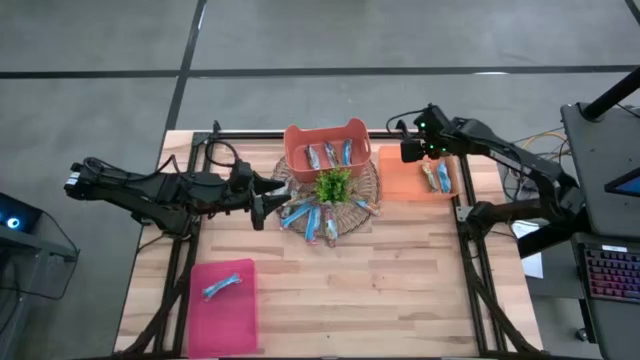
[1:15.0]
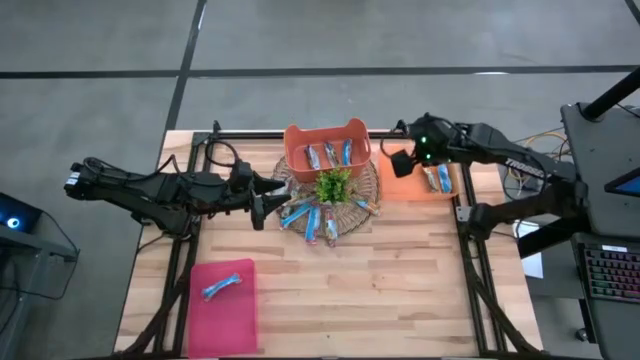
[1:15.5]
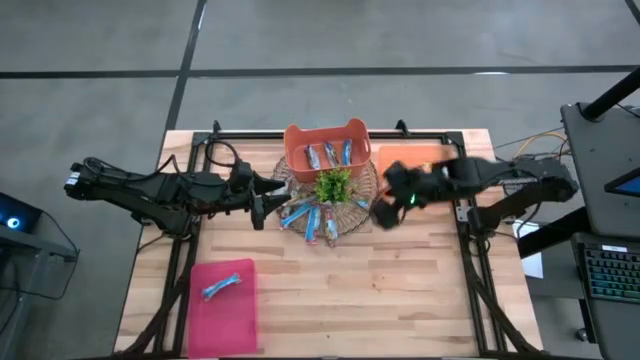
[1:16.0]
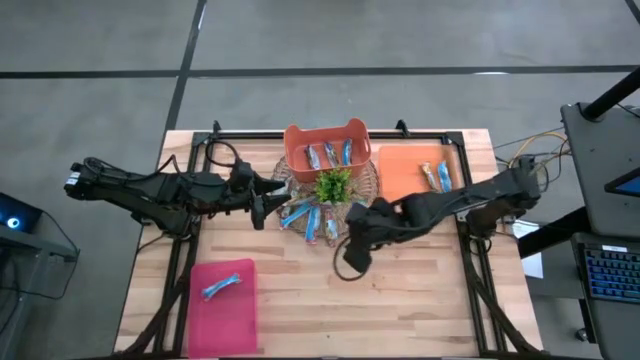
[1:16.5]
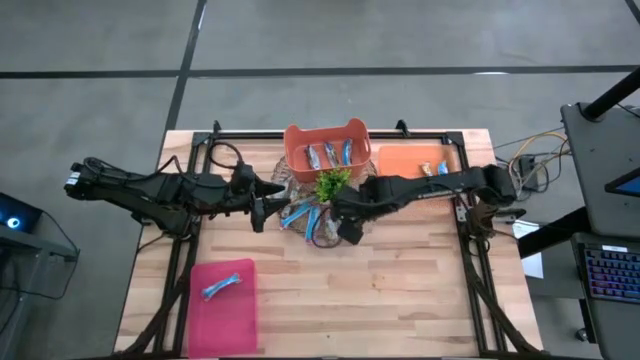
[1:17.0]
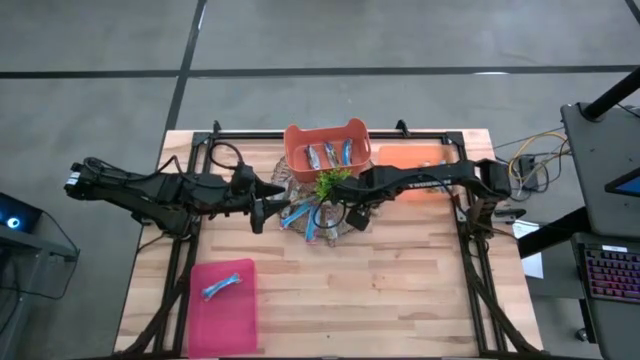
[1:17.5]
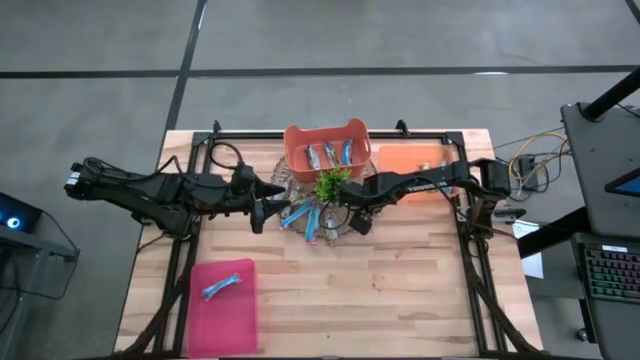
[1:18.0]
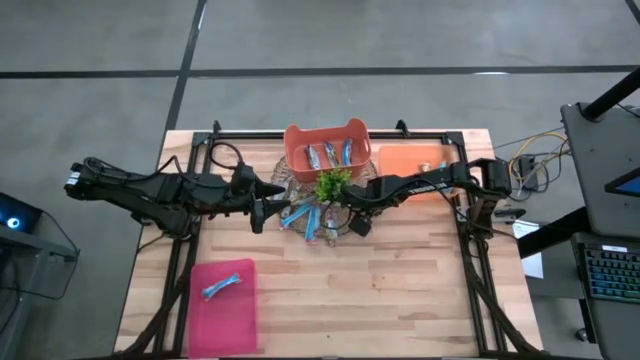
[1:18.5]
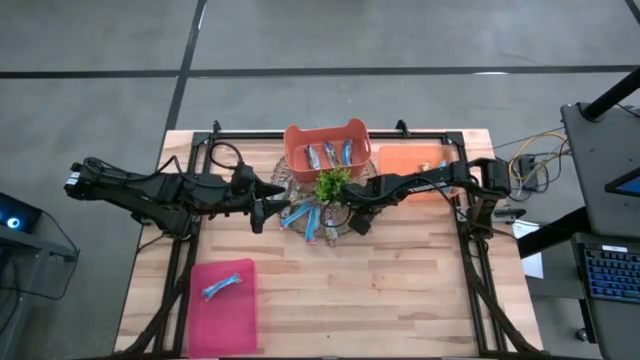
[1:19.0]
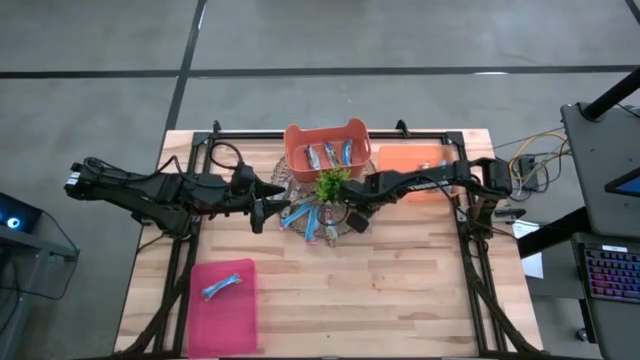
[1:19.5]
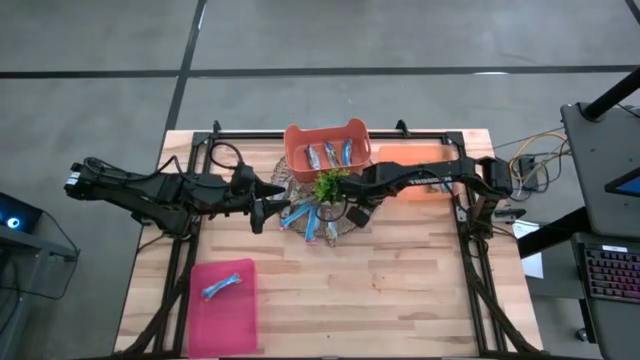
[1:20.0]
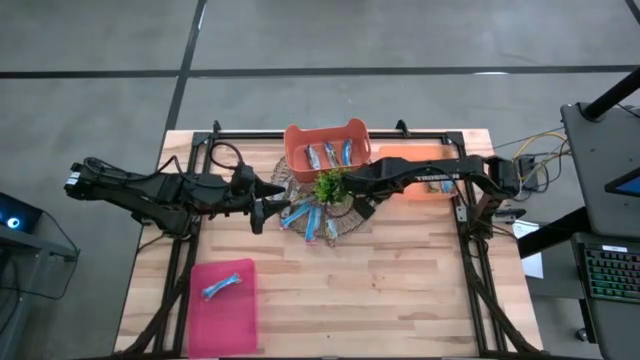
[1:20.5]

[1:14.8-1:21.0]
Task: Pick and place Granola Bars by type
Put the orange granola bar into the orange bin

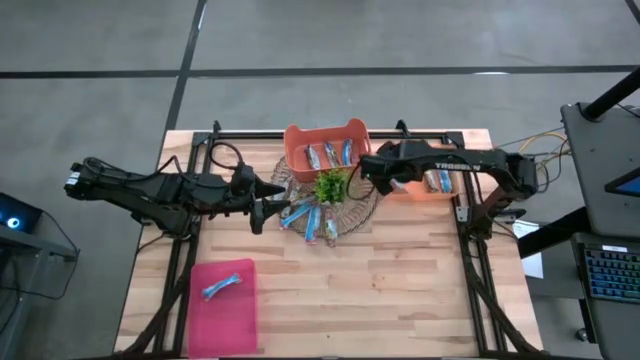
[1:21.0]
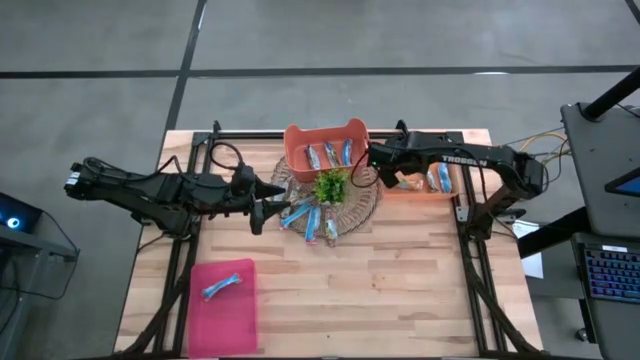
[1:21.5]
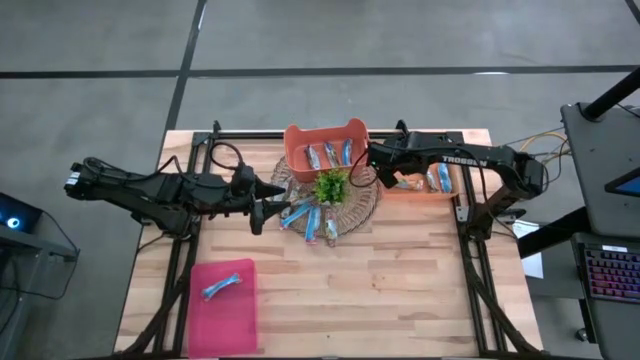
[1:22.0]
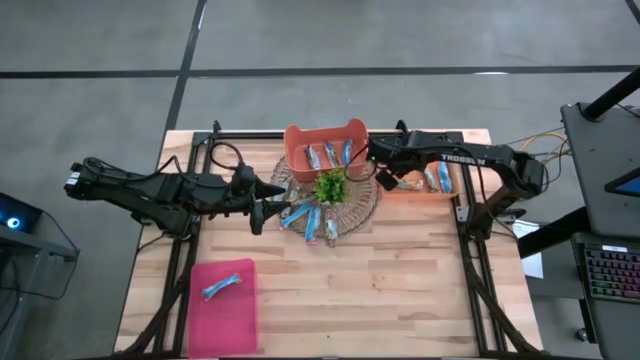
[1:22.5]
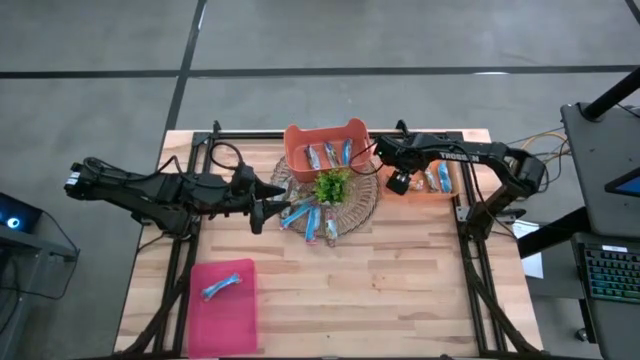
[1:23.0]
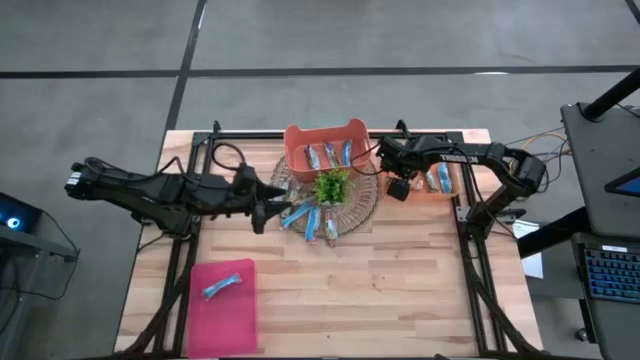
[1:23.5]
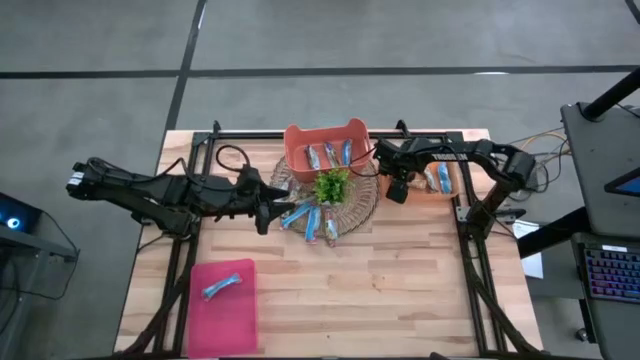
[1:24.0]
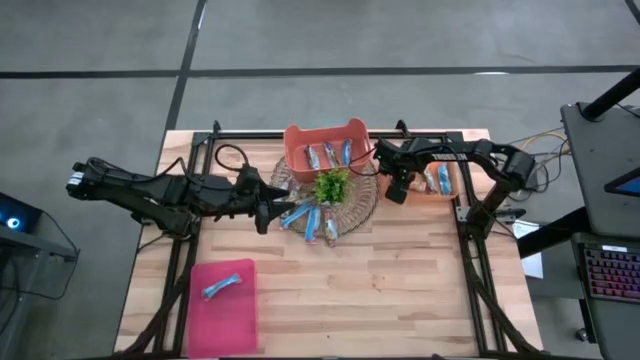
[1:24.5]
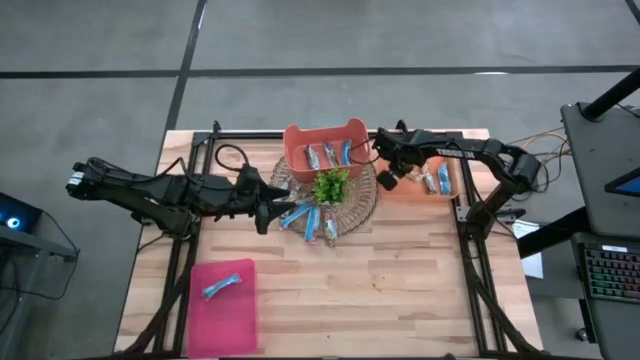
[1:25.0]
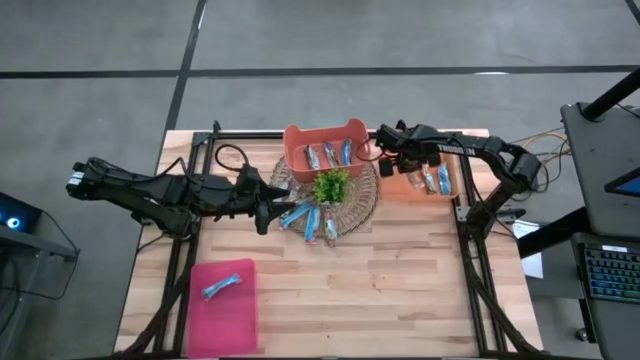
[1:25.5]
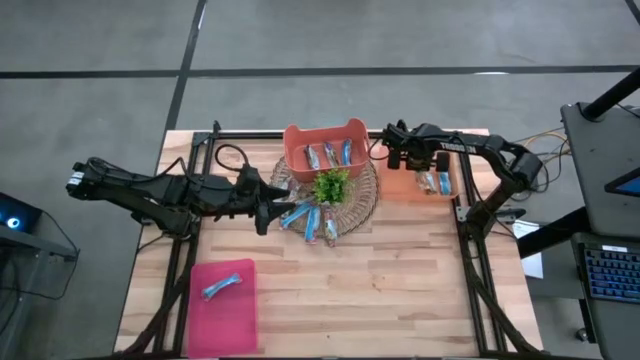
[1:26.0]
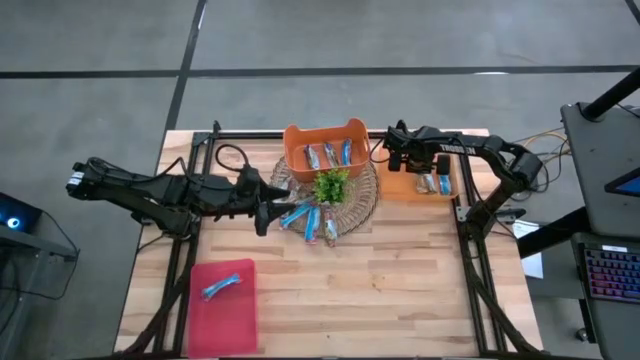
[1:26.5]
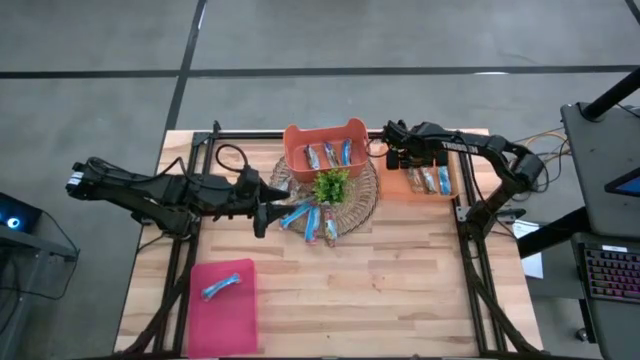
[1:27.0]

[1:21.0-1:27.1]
Put the orange granola bar into the orange bin

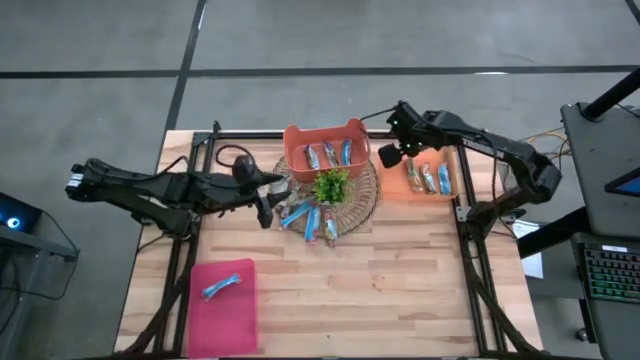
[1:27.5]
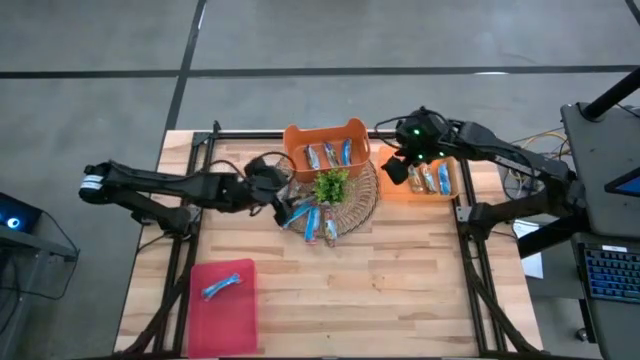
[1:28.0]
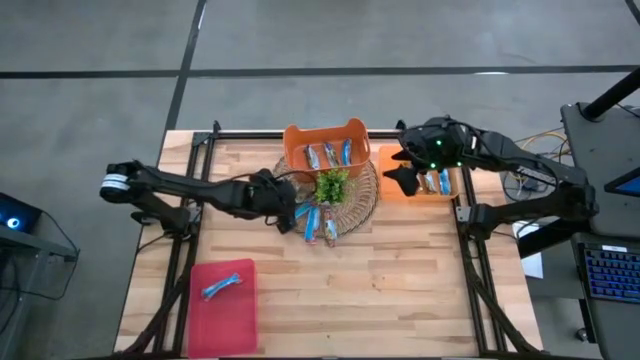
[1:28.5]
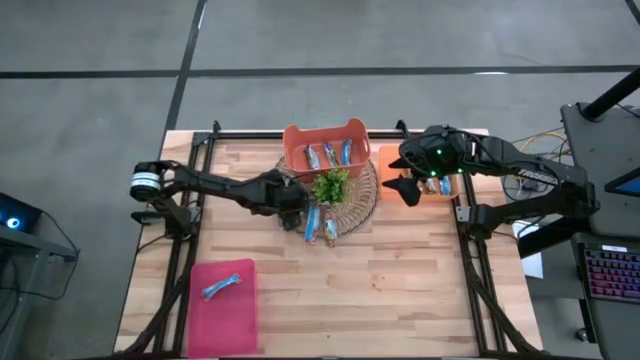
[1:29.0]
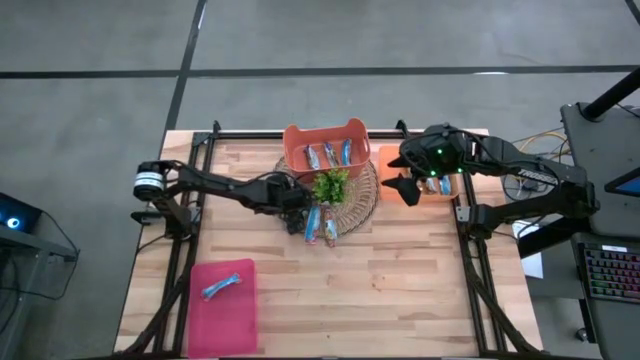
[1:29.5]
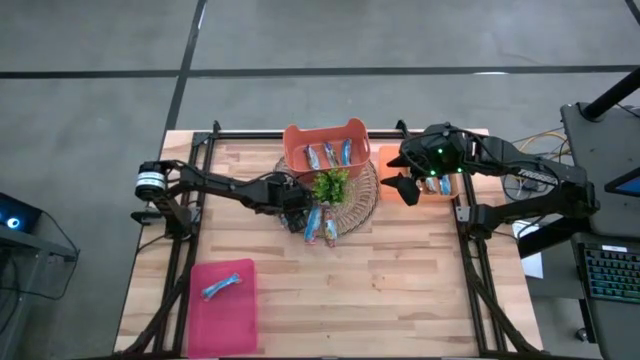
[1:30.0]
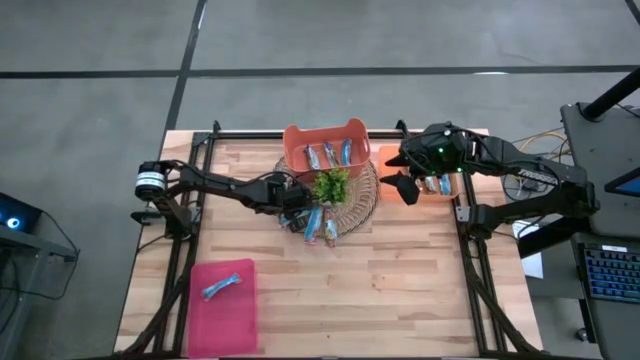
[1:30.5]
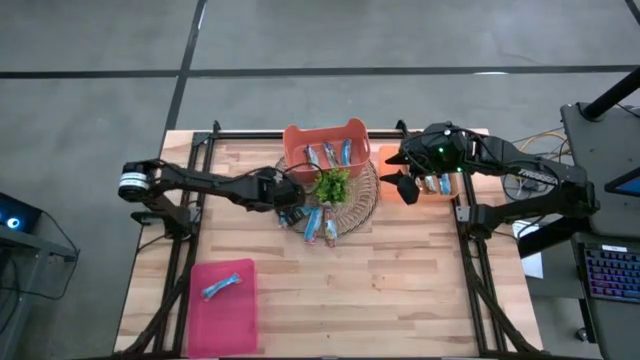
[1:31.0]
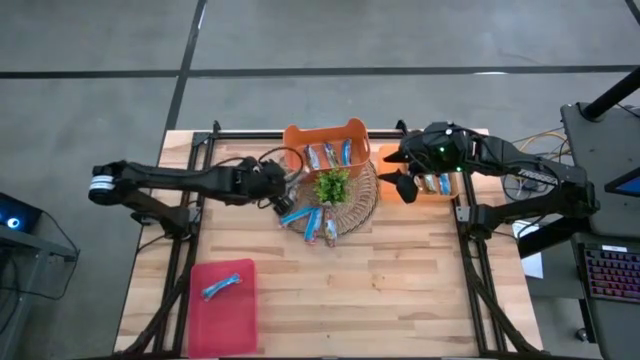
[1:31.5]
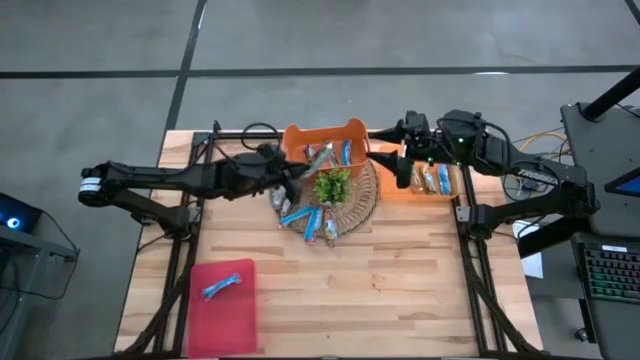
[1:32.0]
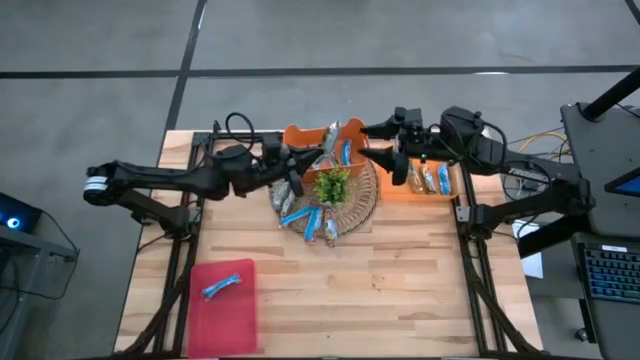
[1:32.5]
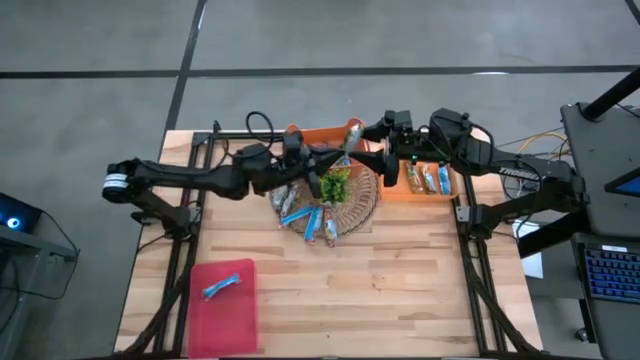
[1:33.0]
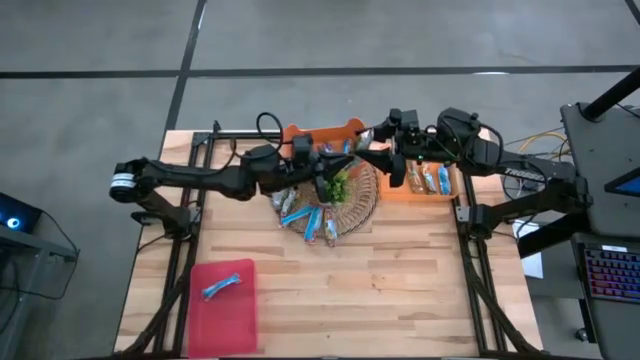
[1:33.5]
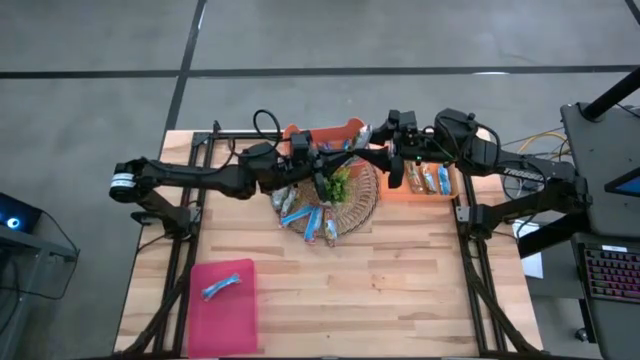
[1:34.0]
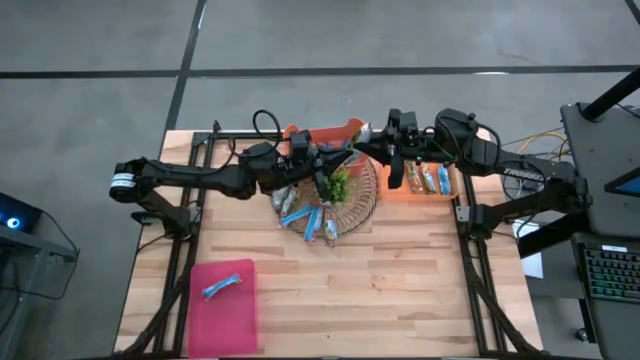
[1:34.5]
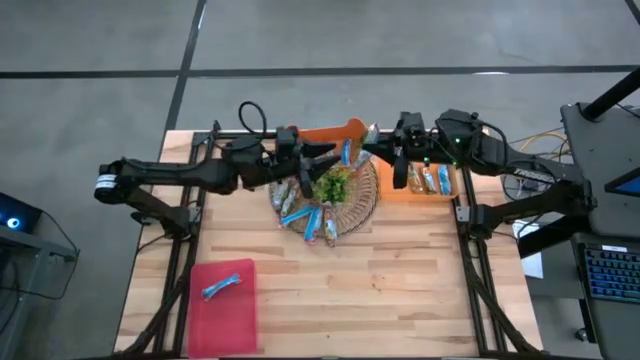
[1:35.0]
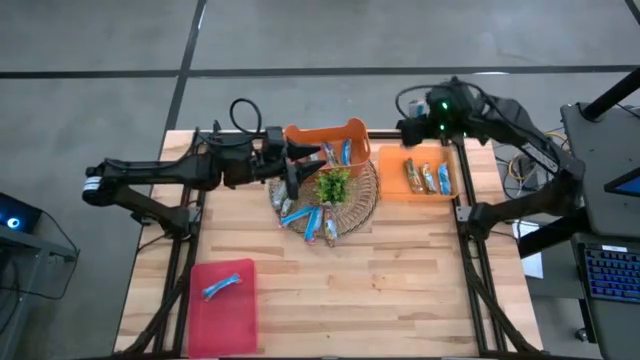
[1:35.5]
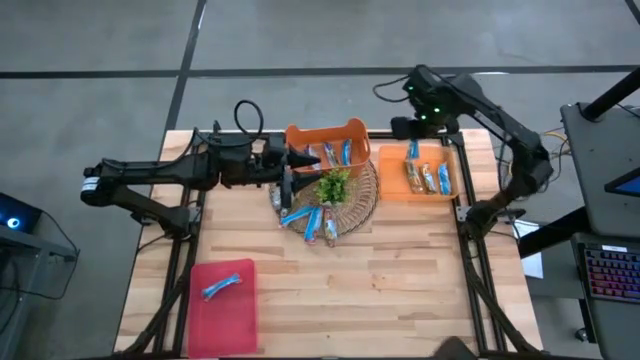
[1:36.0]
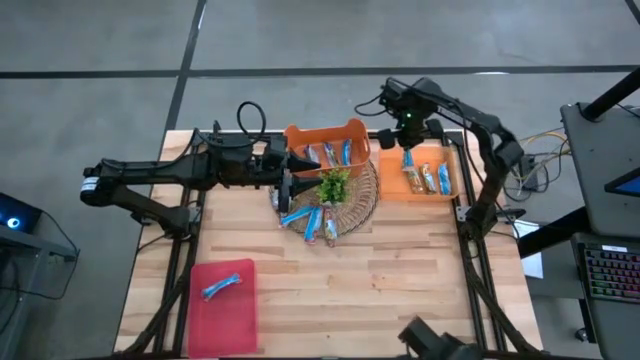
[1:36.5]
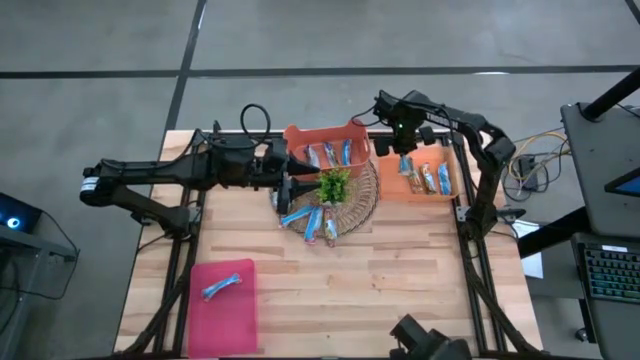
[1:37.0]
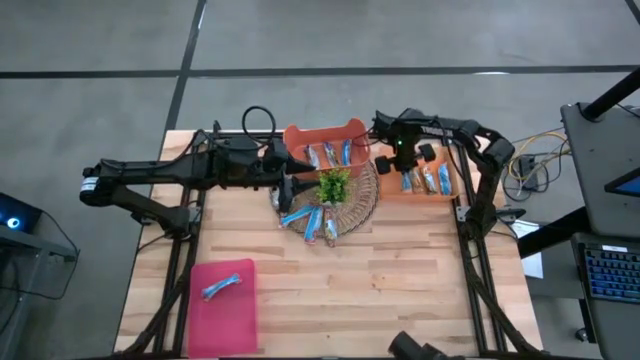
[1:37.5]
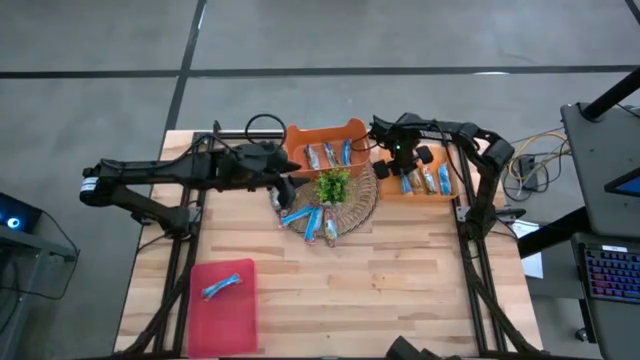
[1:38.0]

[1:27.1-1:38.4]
Put the orange granola bar into the orange bin
